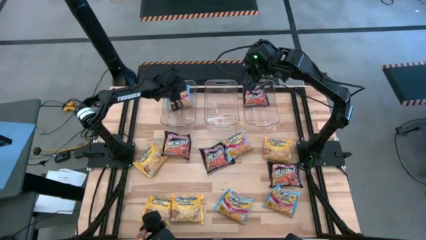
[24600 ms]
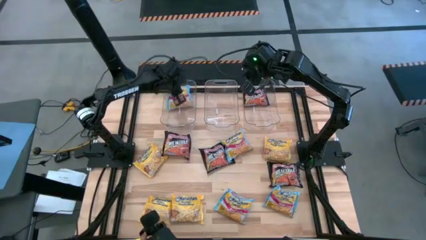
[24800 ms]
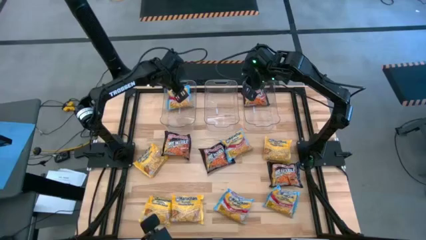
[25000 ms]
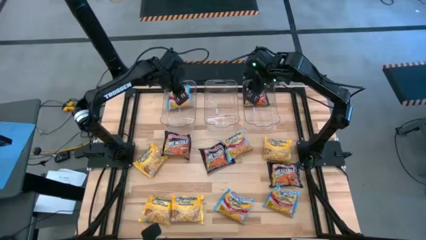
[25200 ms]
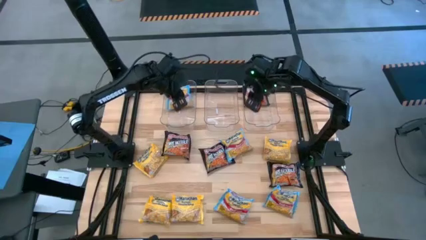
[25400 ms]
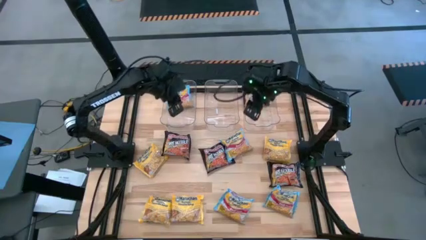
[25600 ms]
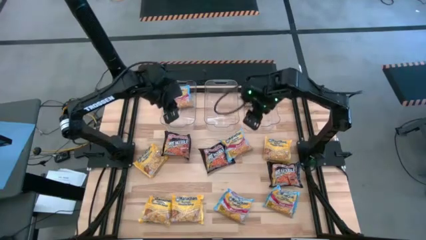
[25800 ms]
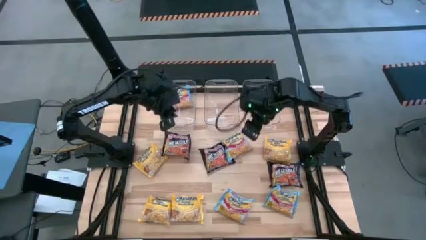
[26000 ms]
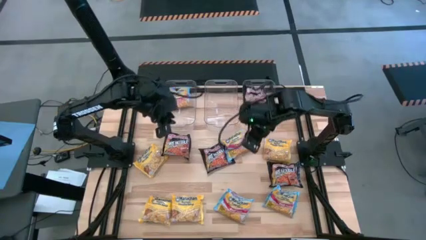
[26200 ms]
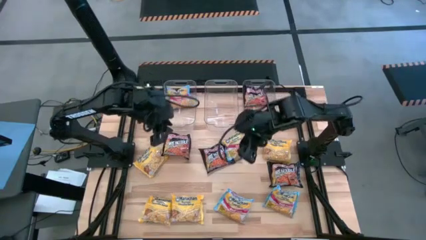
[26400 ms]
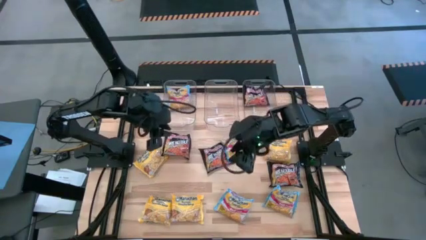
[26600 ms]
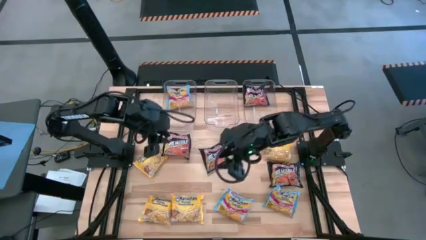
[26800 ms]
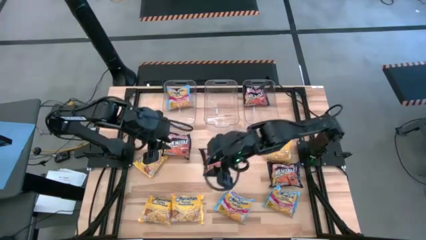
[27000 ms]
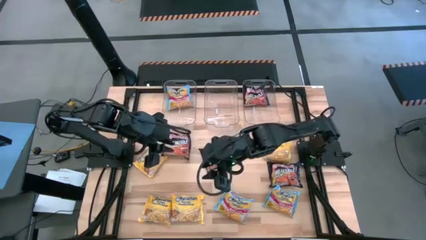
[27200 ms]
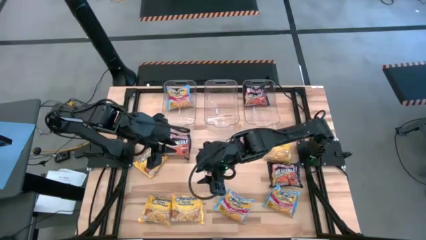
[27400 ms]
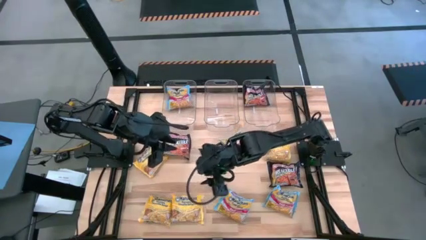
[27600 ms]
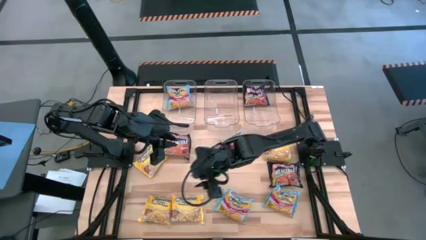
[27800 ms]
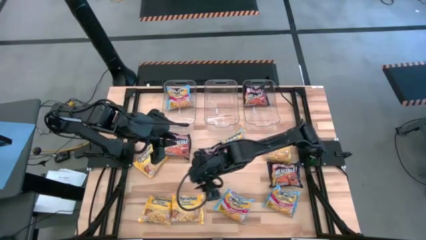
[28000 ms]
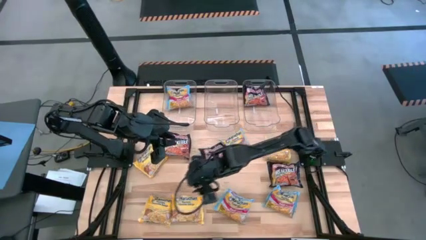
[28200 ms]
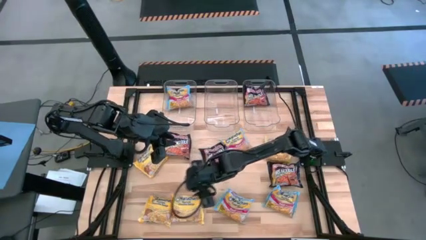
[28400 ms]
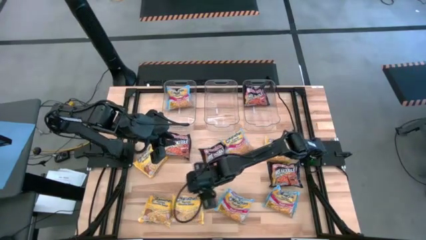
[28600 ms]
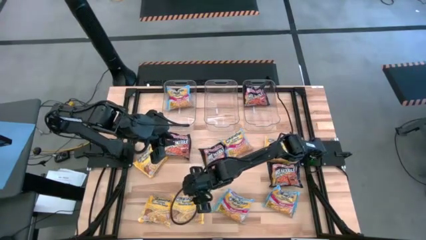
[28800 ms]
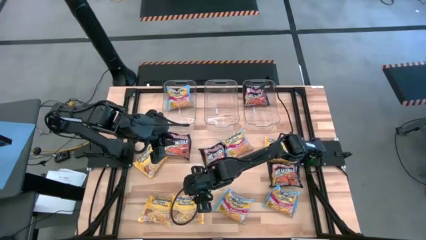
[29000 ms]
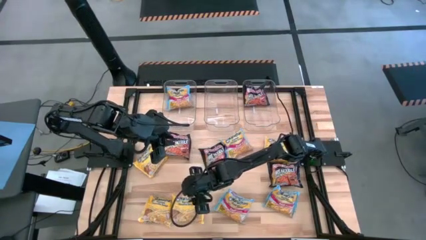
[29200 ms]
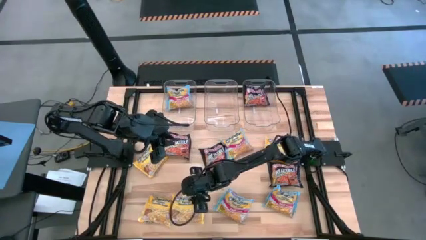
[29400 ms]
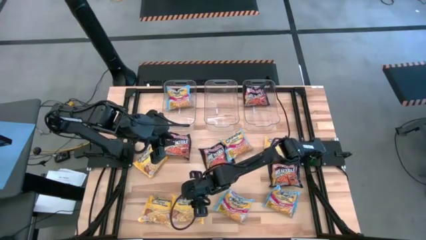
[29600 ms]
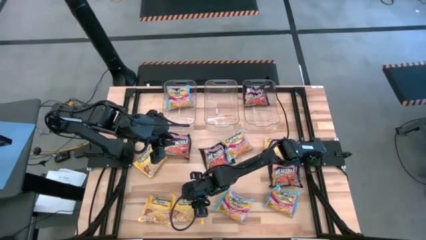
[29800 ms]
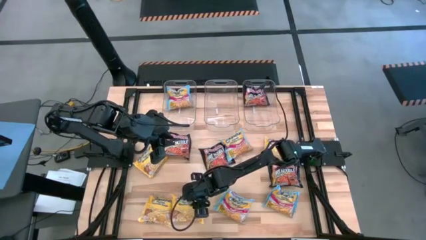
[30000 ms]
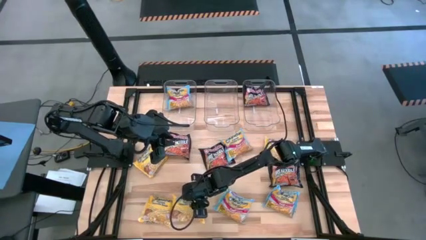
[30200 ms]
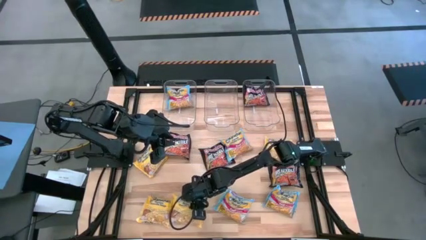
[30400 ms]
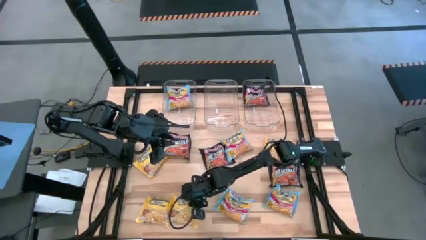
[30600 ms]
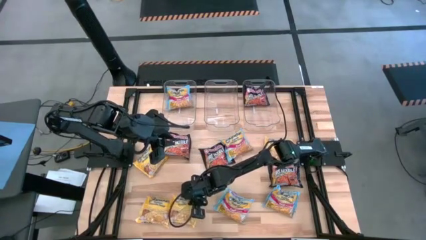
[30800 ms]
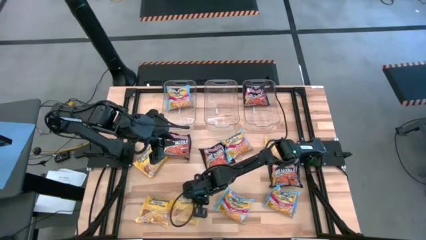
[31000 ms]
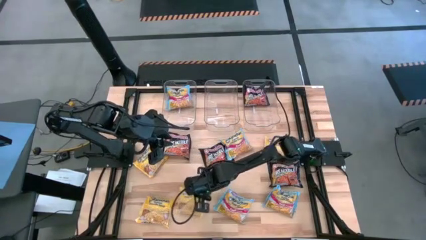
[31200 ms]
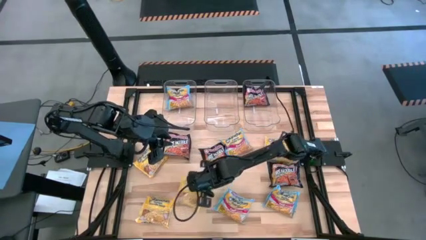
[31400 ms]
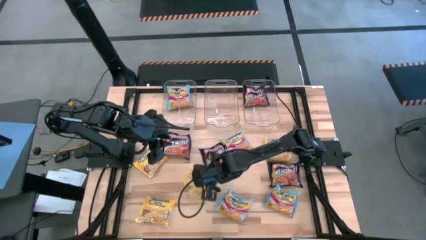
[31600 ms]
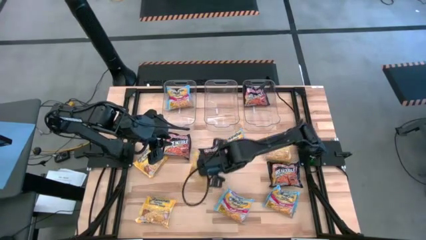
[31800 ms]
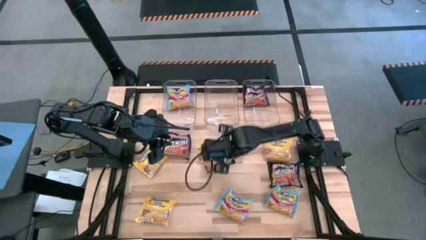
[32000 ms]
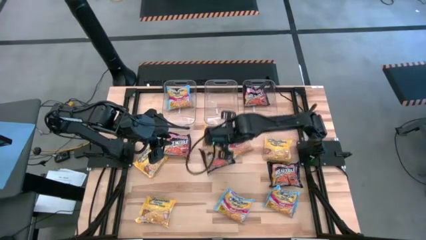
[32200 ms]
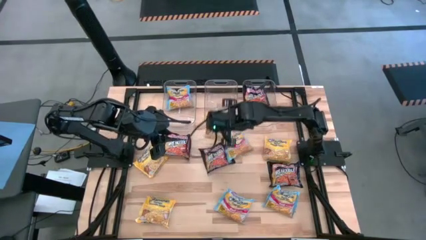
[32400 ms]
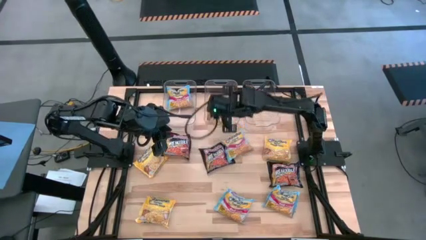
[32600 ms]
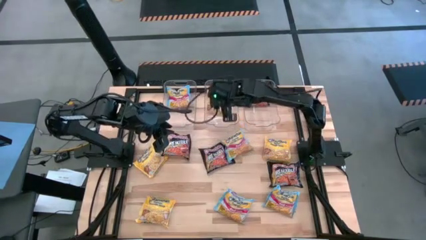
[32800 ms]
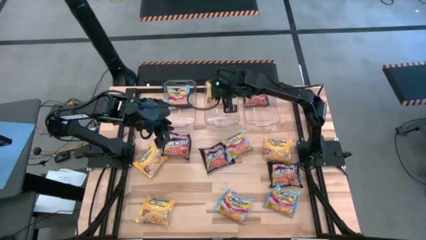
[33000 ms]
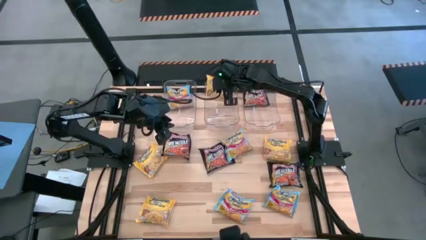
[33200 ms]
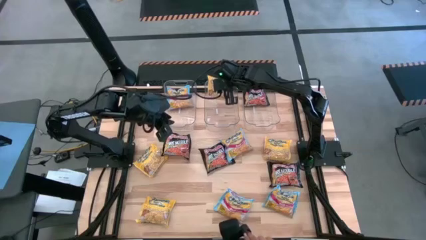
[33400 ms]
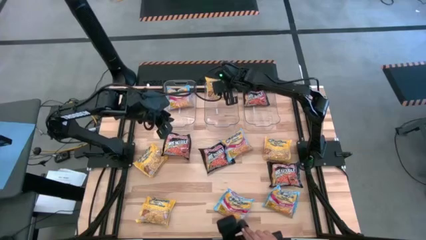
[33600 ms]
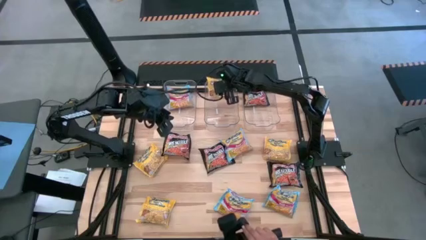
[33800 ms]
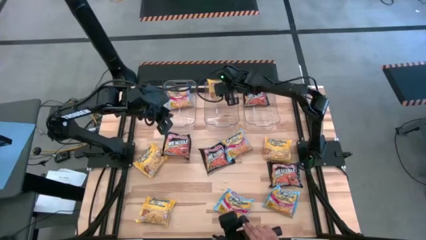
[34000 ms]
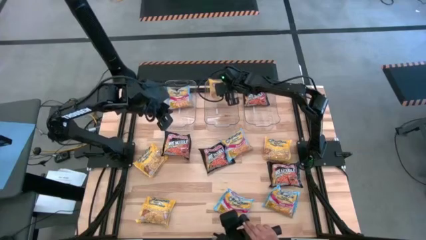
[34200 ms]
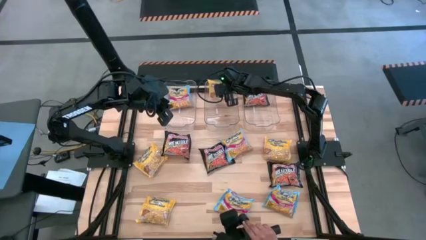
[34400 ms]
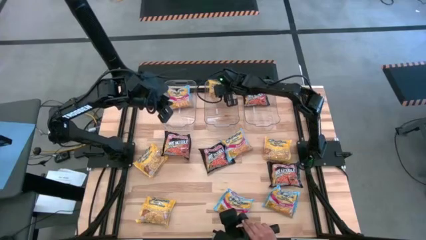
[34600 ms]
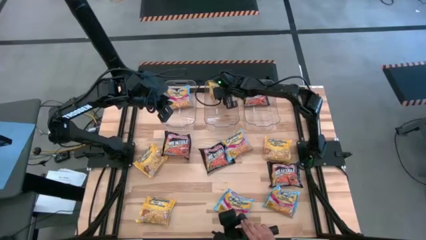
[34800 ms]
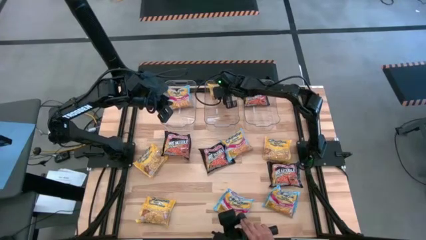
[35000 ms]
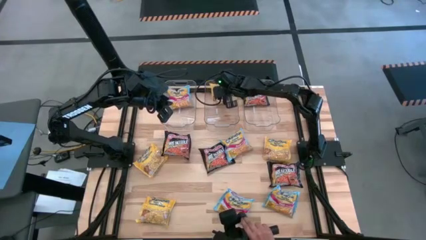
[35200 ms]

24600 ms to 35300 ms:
Task: Sort Maruchan noodles
Put the yellow noodle pack into the middle transparent bin
